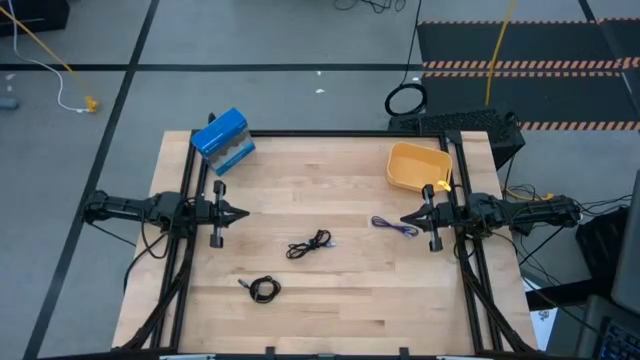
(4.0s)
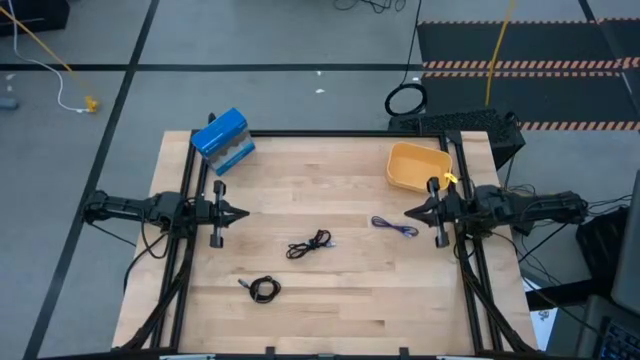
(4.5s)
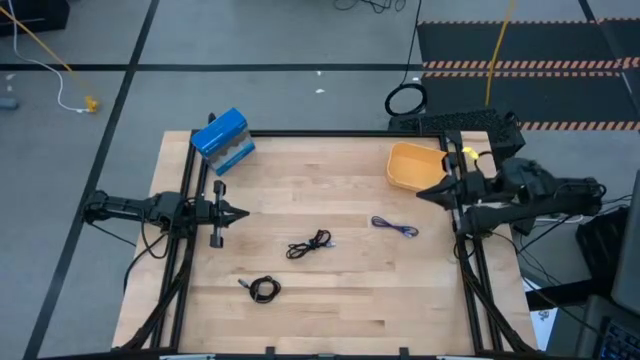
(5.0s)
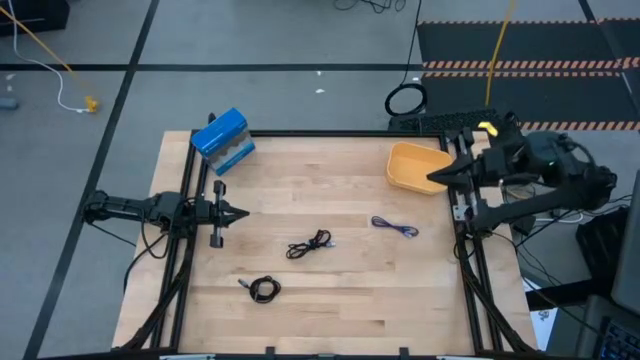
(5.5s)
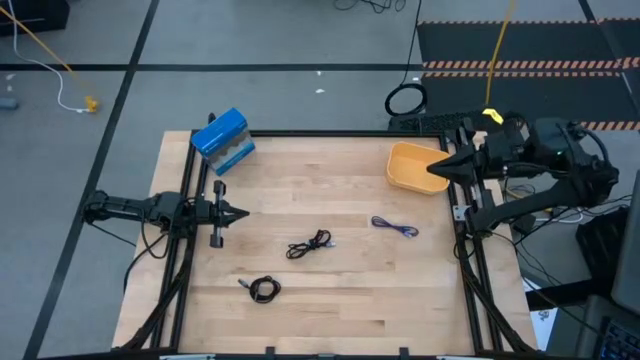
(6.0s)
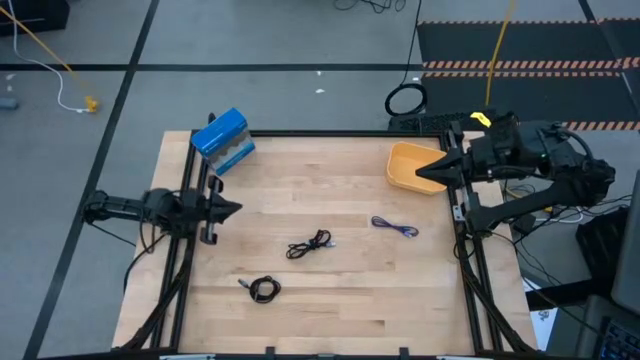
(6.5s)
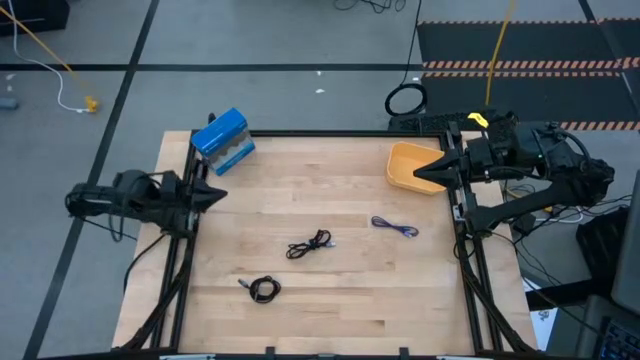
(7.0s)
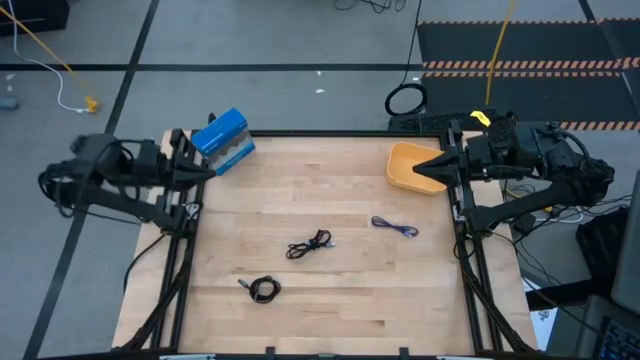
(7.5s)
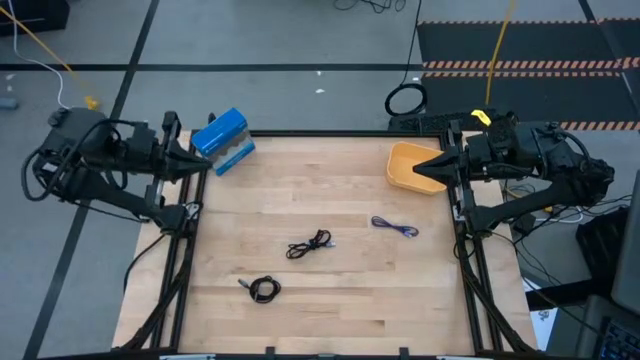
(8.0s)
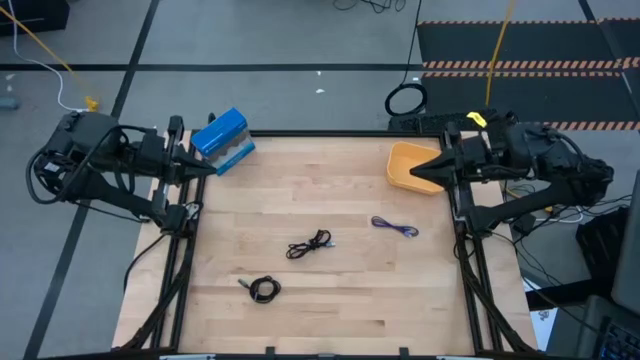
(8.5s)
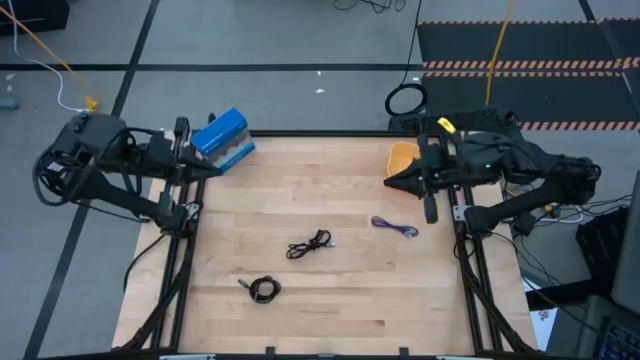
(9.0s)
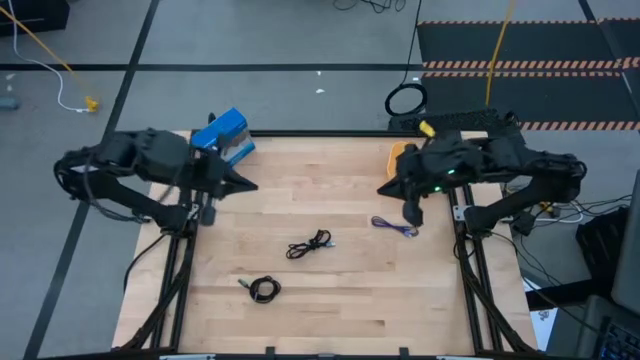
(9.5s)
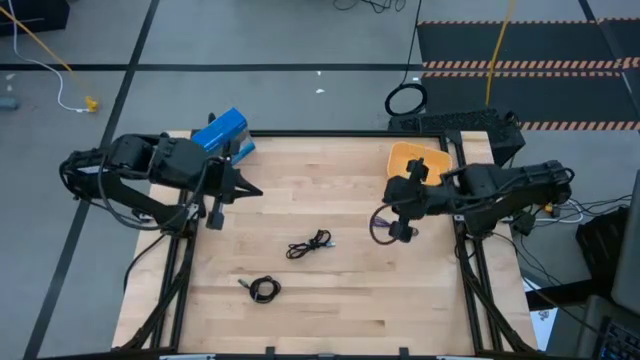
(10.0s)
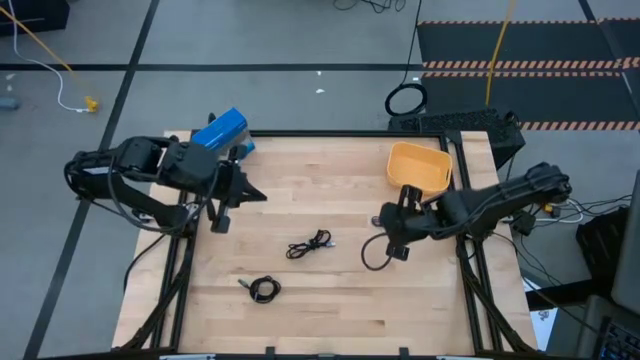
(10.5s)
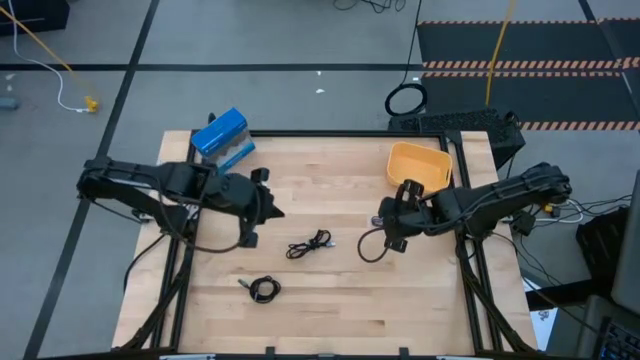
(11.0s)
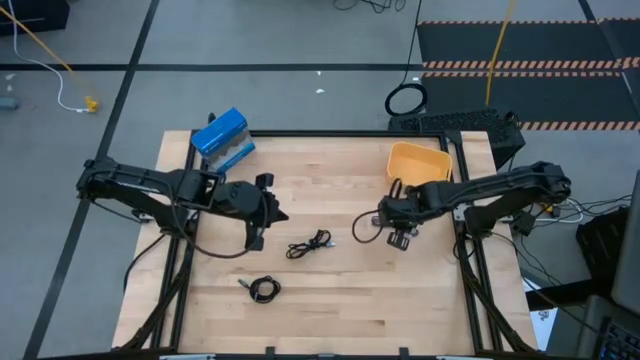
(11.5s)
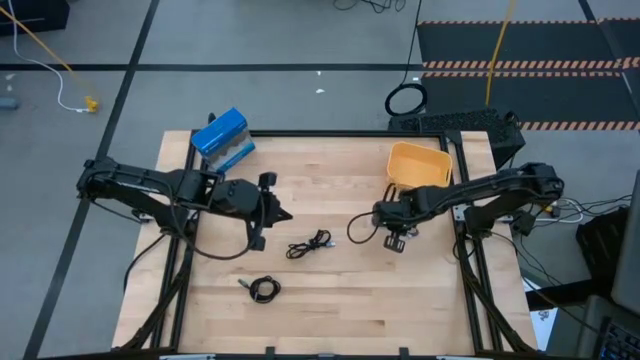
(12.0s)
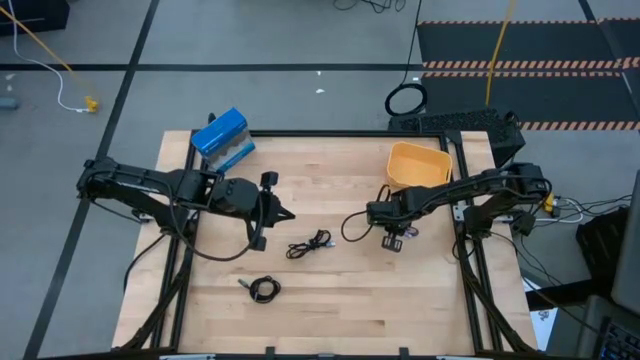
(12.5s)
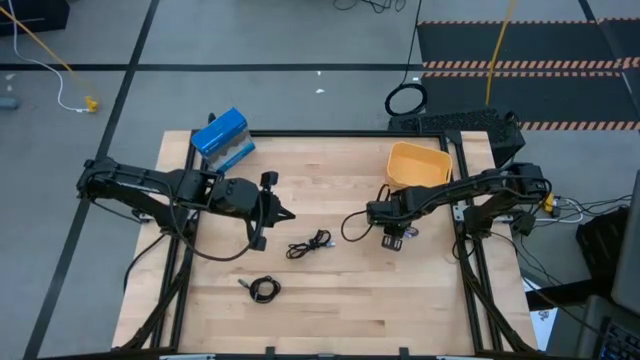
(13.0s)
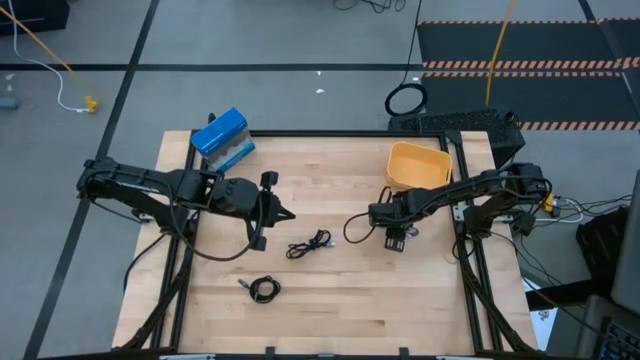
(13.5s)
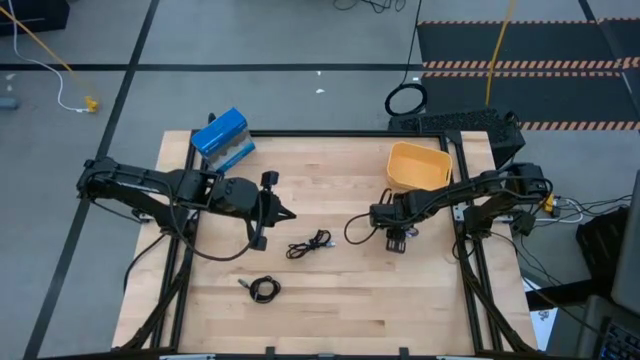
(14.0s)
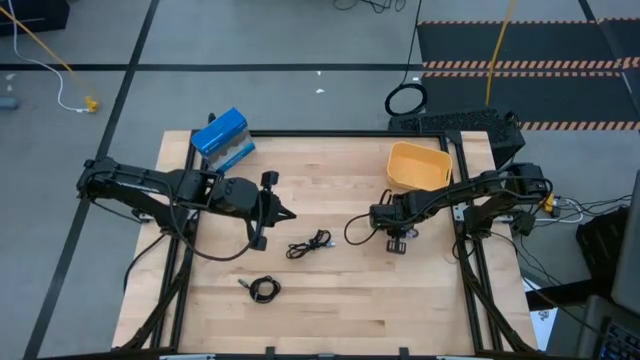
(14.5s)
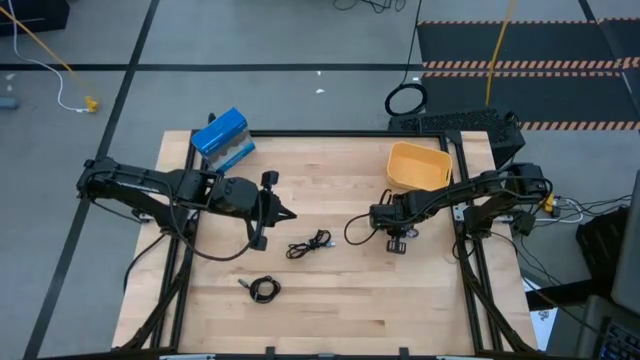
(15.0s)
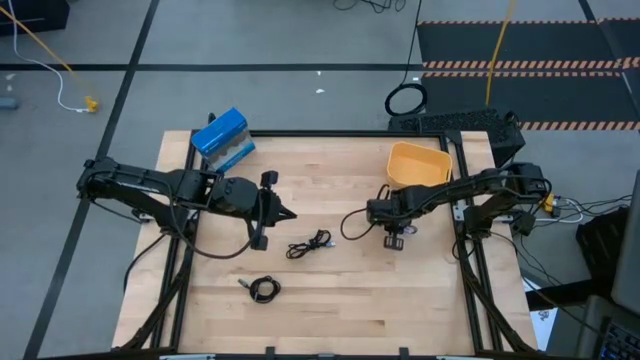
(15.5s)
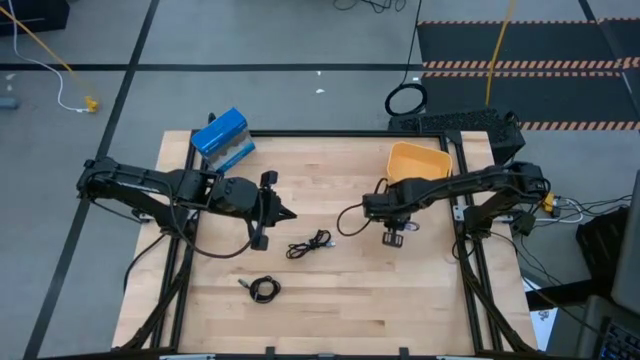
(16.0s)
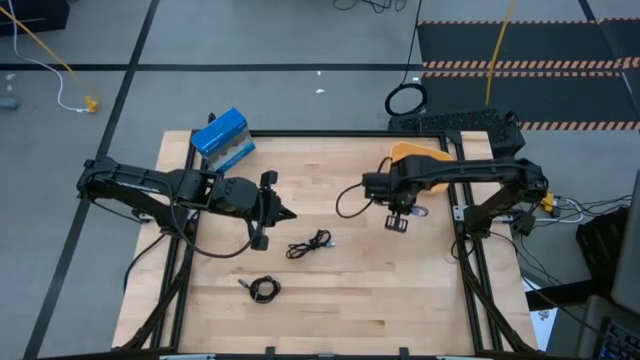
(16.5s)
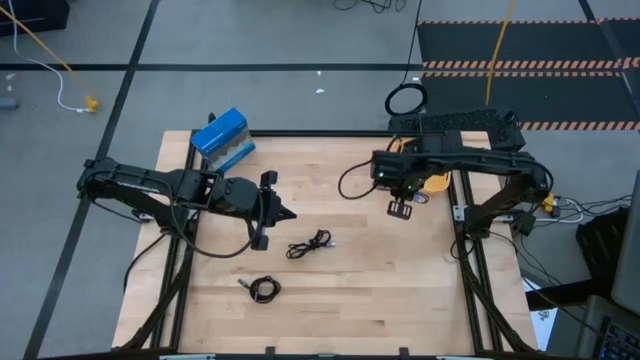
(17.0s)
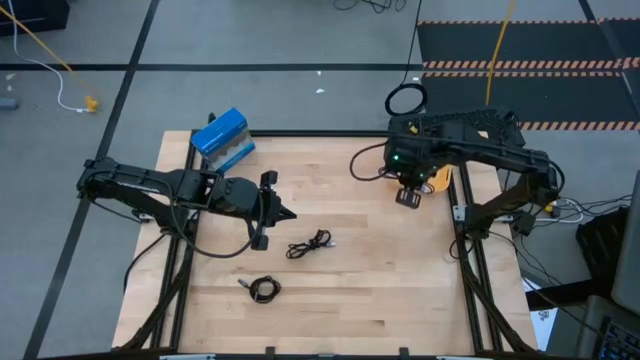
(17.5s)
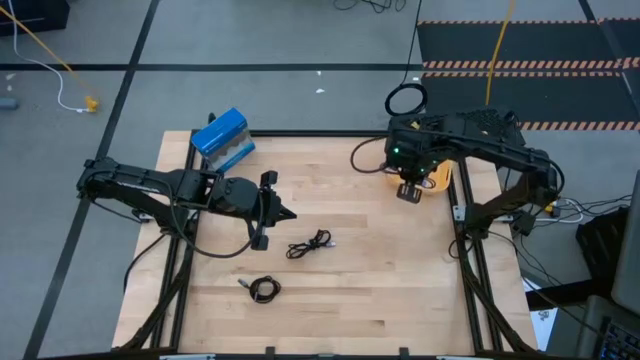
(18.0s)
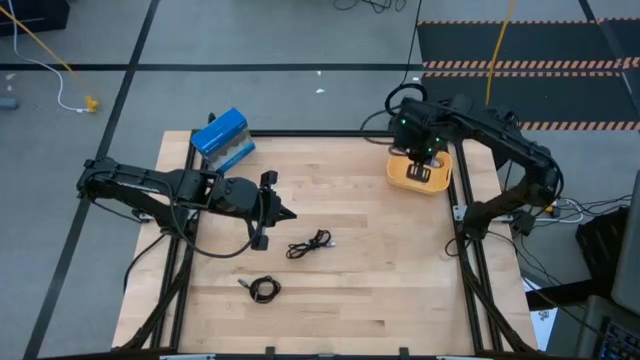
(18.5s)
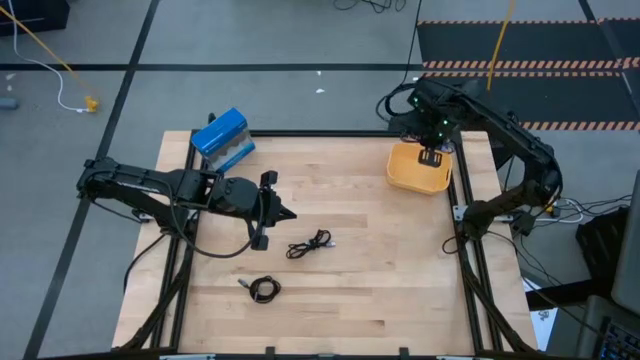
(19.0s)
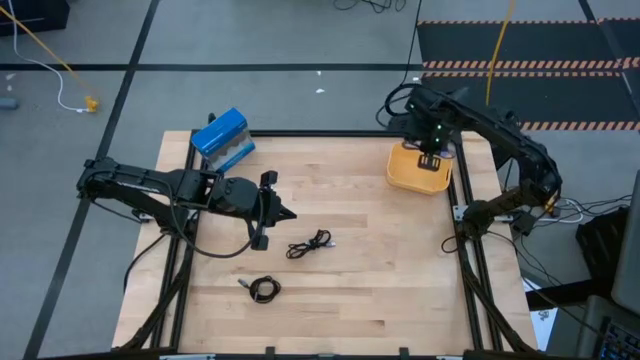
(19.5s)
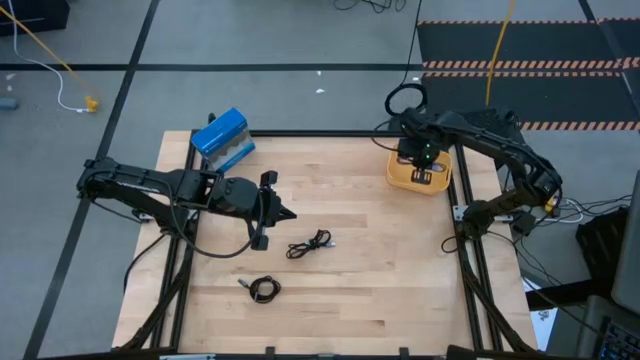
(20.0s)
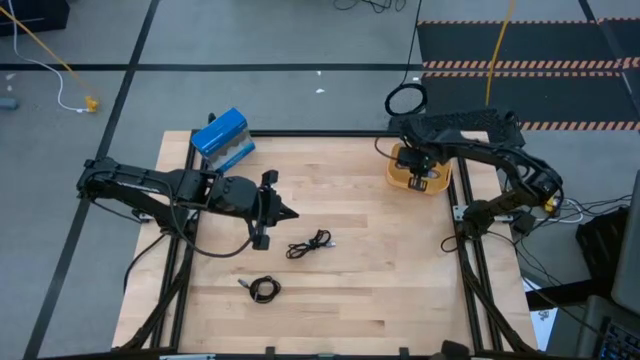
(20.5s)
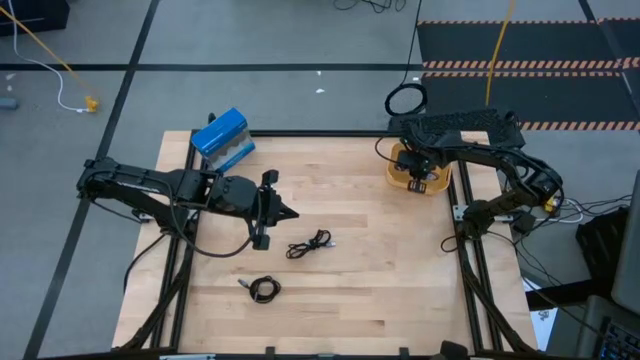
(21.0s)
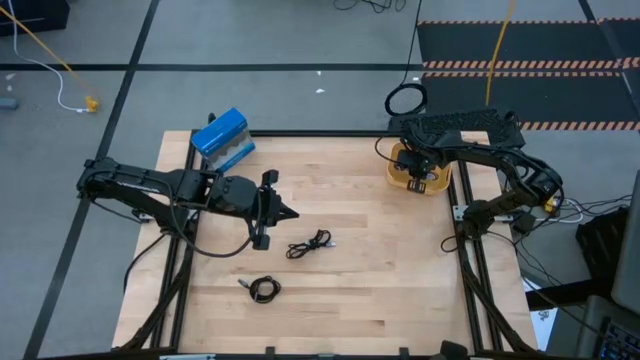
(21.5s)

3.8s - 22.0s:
Task: Pick and place USB-C Cables
Put the purple charger cable into the yellow bin
